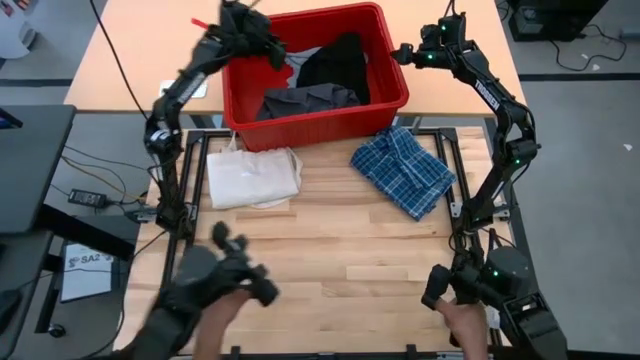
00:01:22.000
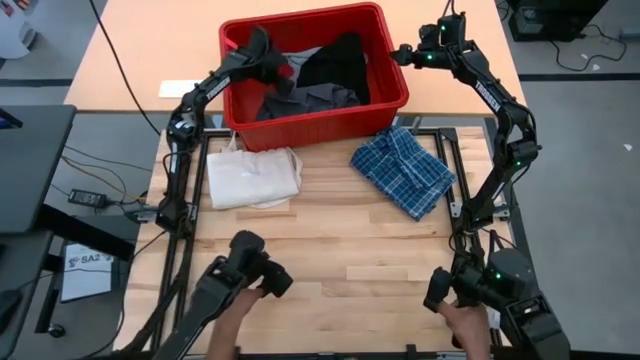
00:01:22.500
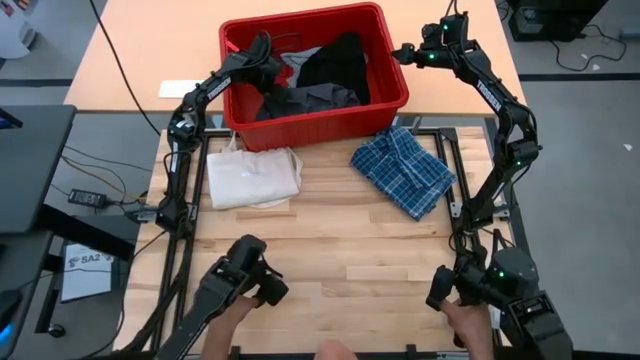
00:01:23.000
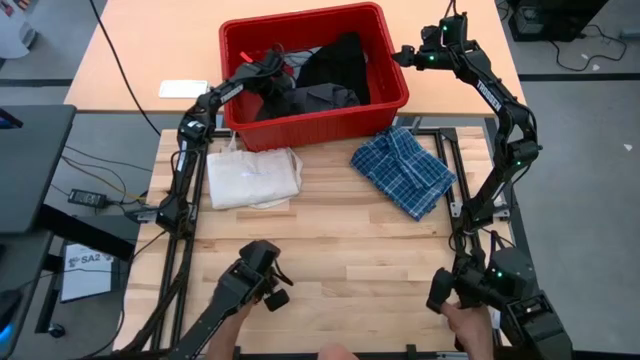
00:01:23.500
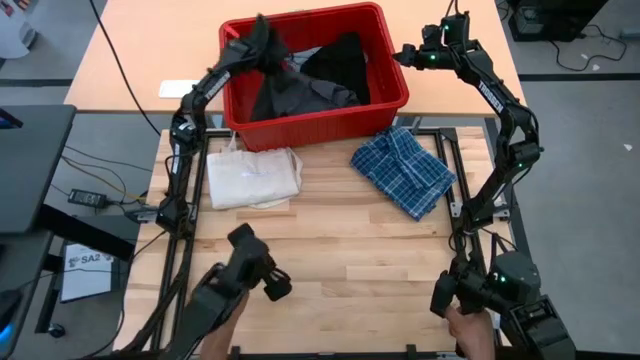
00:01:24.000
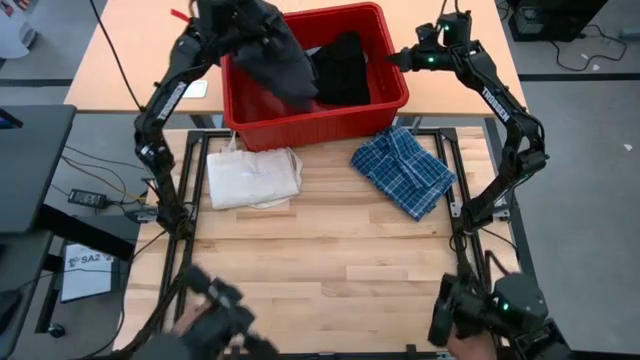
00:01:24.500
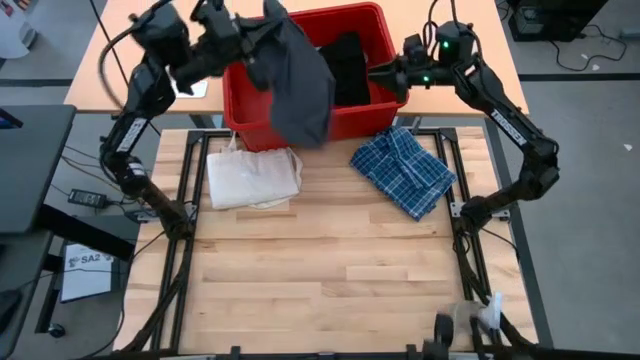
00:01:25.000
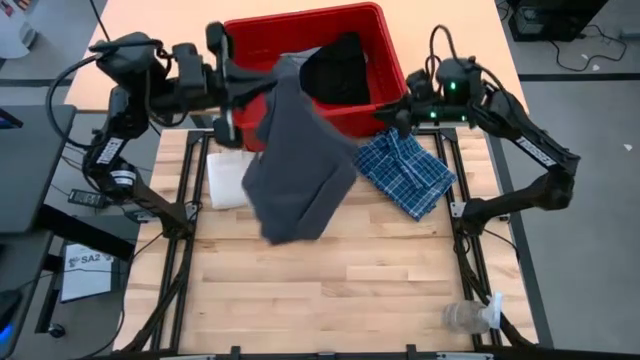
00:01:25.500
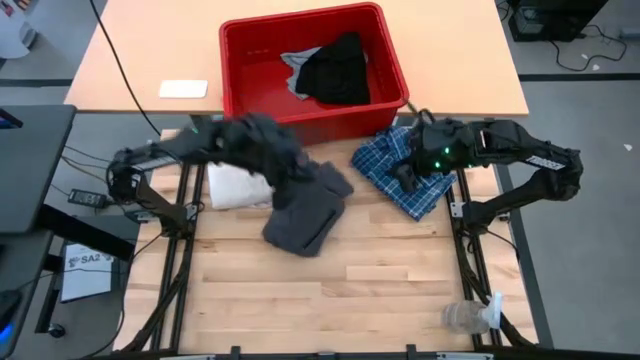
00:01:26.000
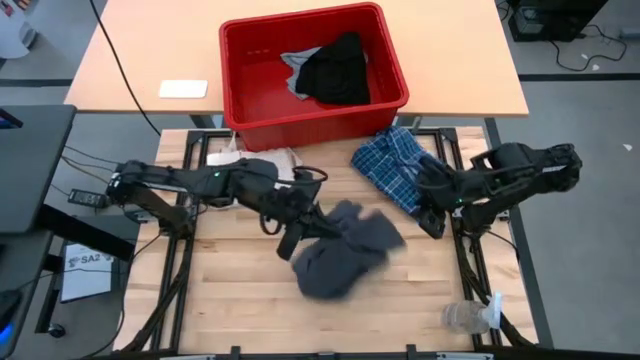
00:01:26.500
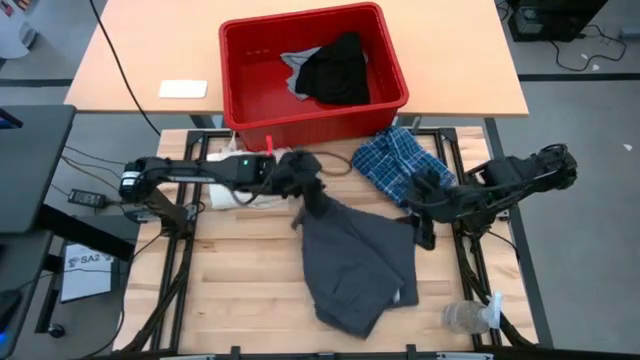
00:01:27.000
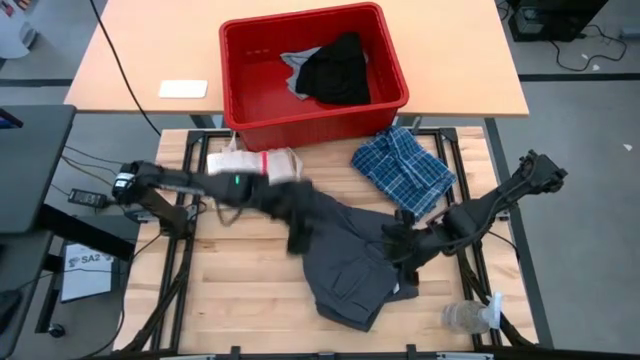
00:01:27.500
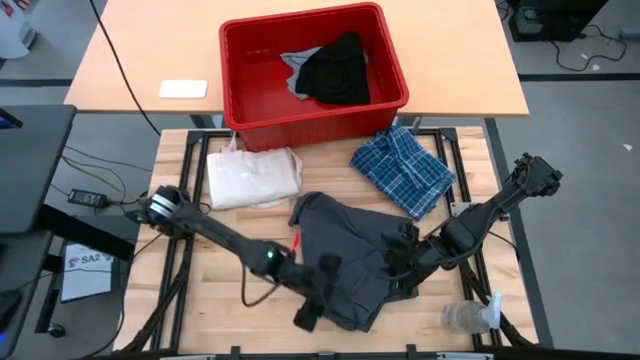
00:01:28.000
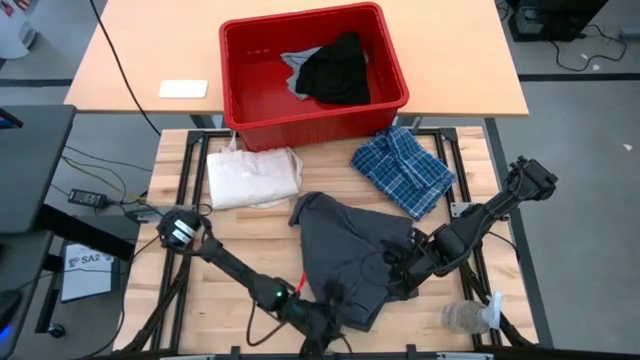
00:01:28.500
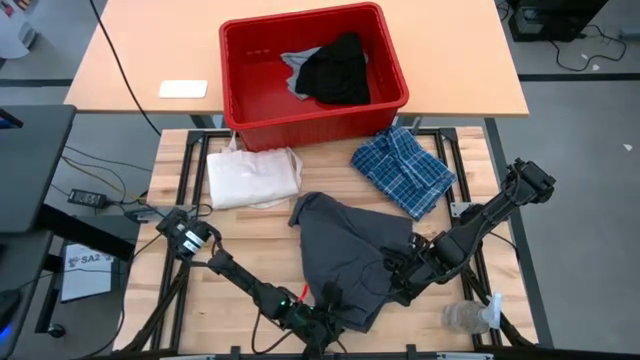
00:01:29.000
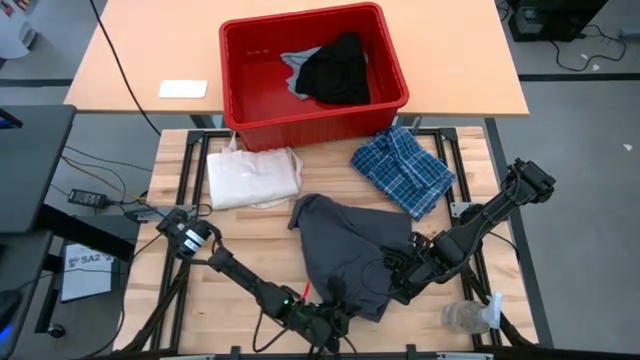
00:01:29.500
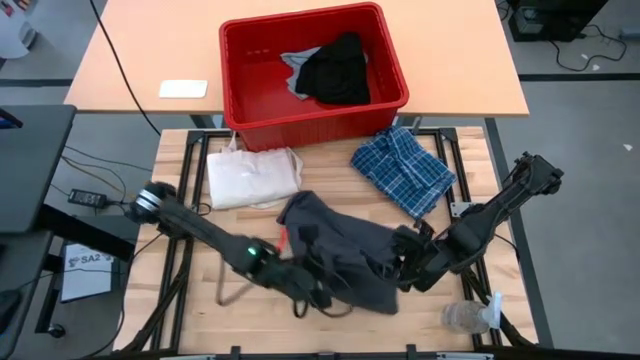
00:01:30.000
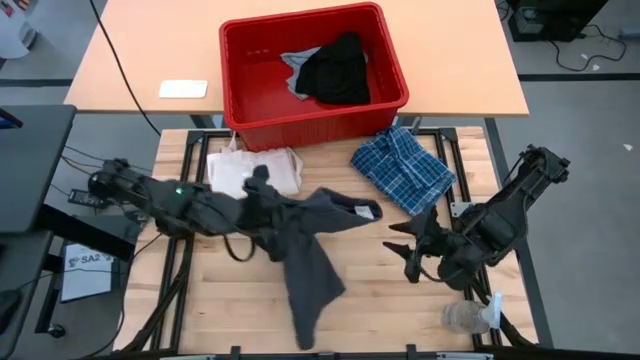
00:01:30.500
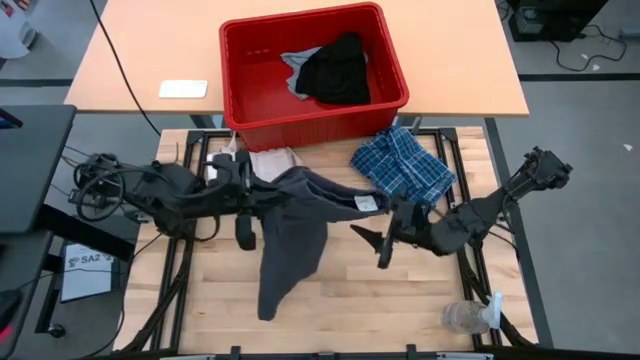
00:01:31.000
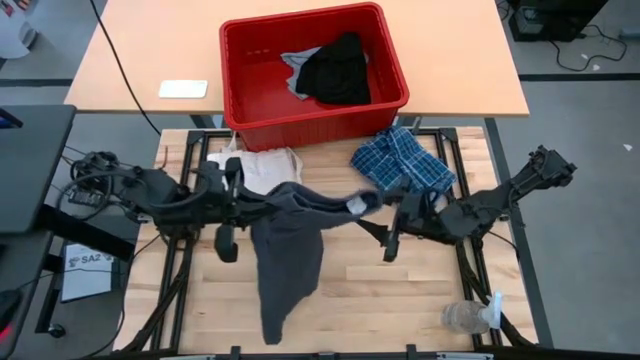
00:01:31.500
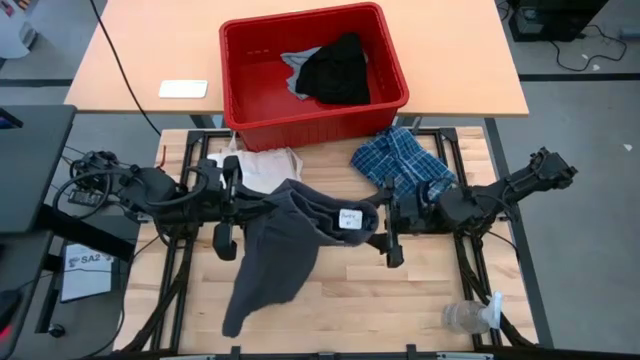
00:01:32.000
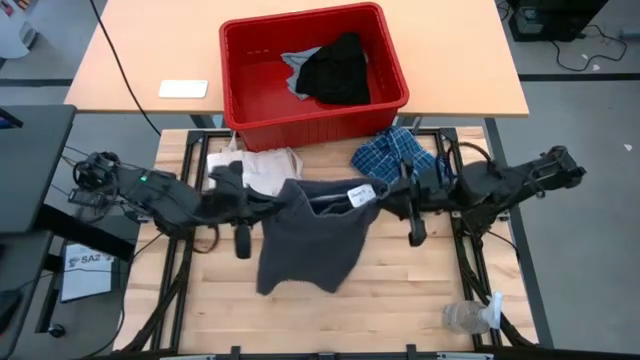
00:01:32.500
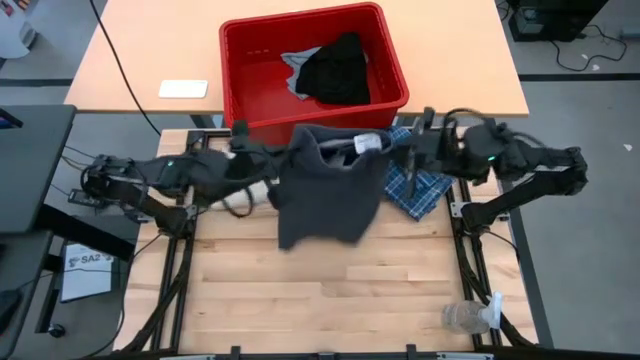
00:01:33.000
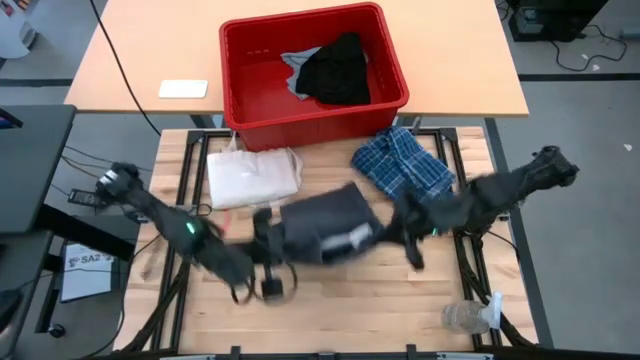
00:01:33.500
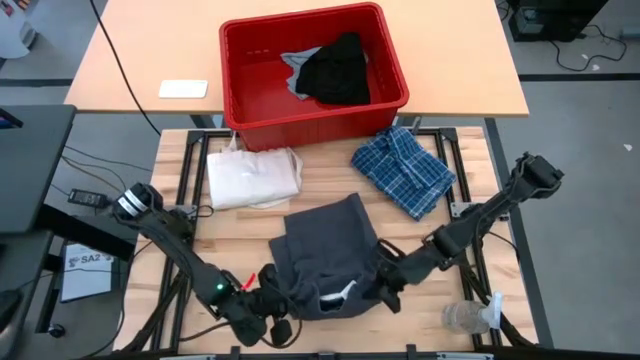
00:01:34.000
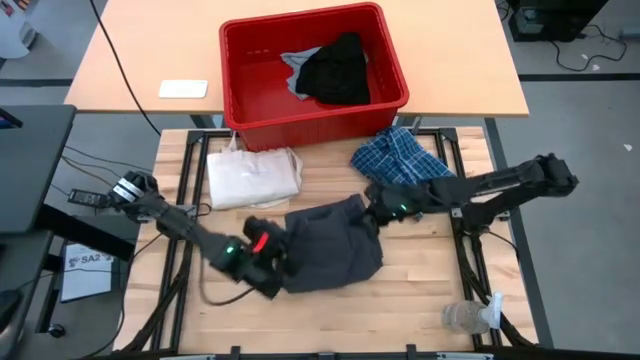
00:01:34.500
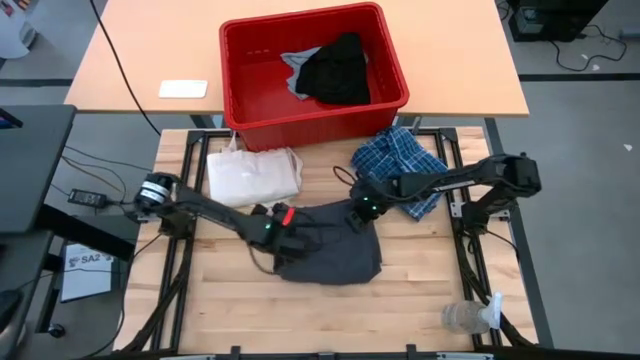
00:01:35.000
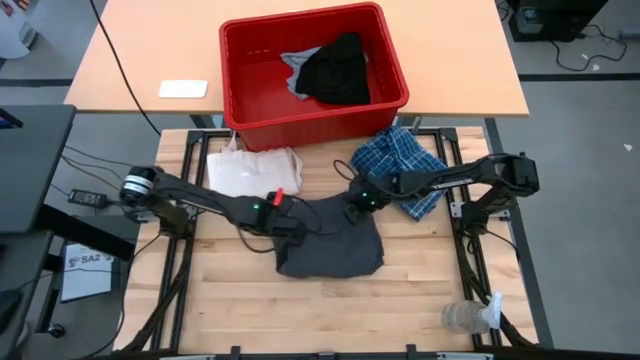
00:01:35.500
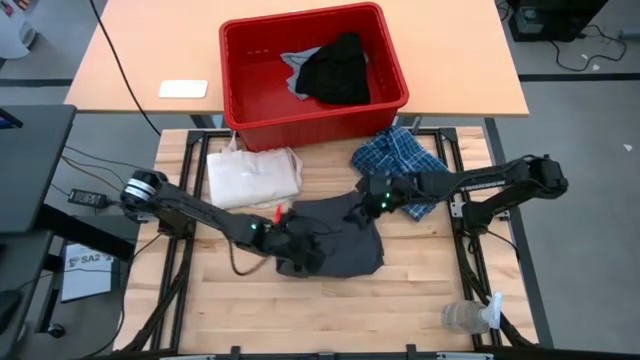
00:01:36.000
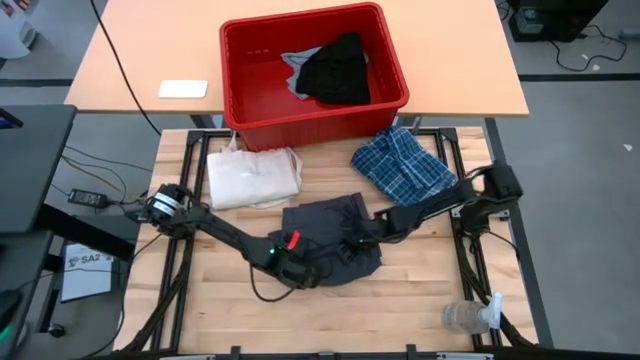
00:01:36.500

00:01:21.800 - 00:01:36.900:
Task: Fold laundry
Fold the gray shorts

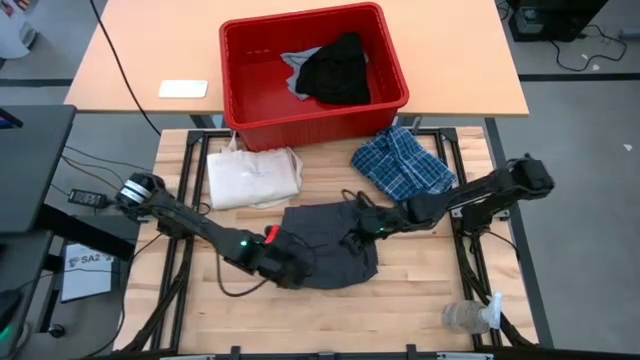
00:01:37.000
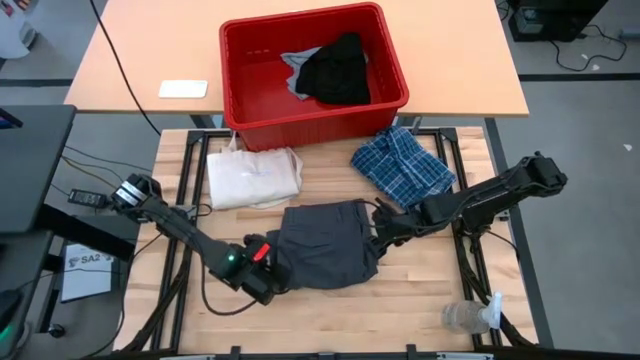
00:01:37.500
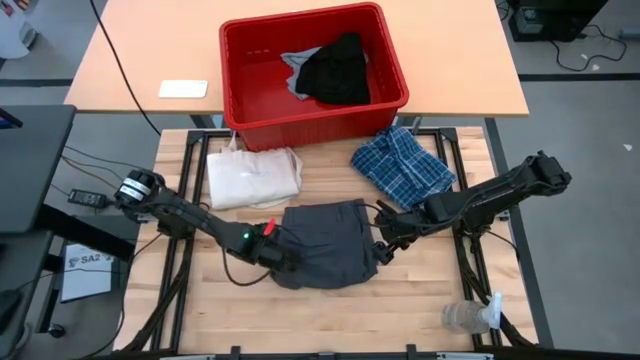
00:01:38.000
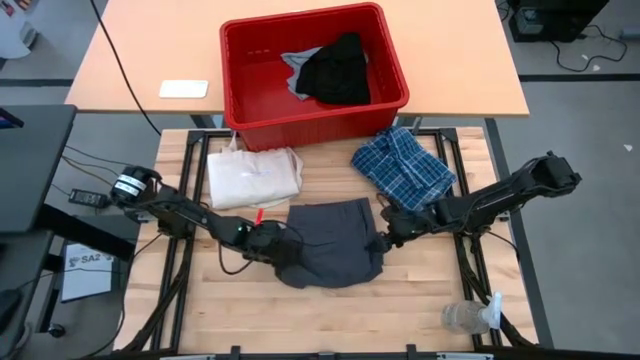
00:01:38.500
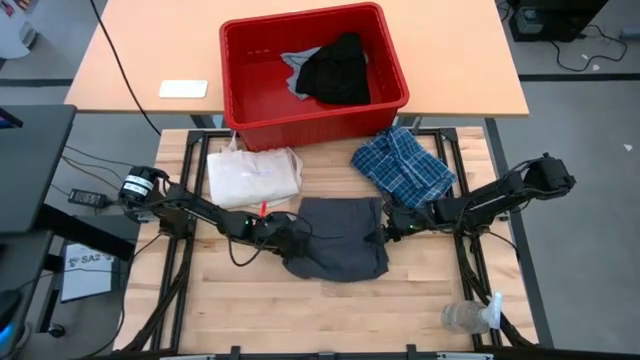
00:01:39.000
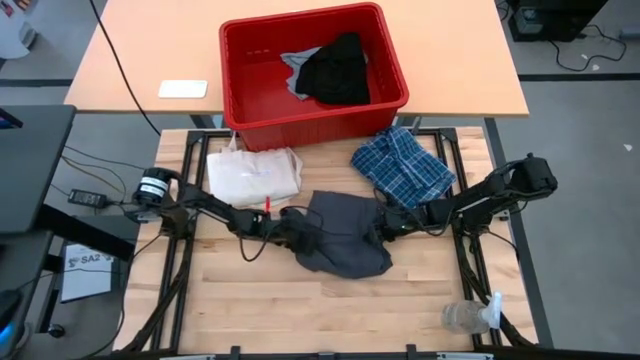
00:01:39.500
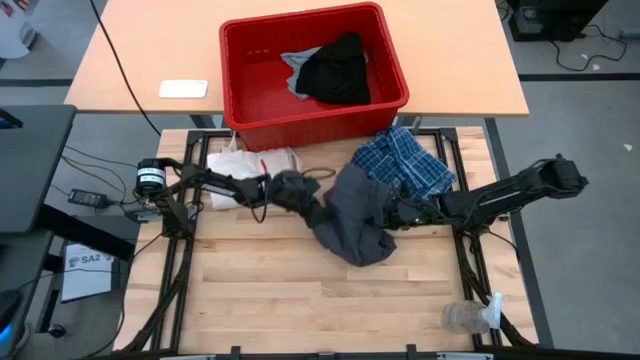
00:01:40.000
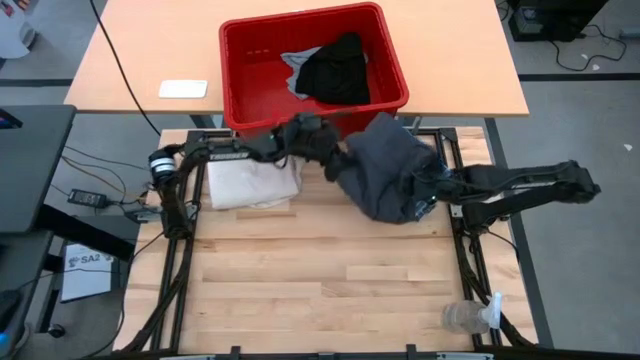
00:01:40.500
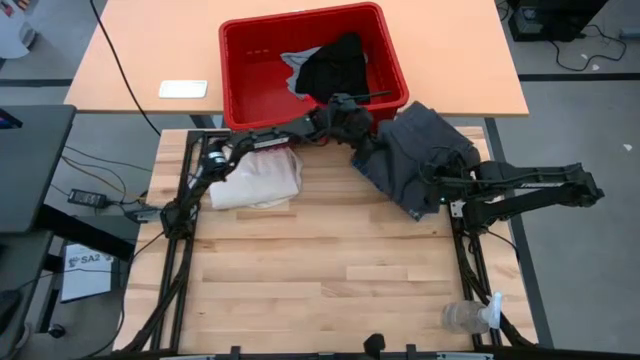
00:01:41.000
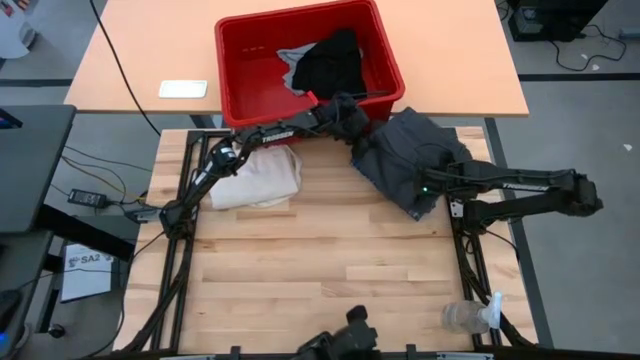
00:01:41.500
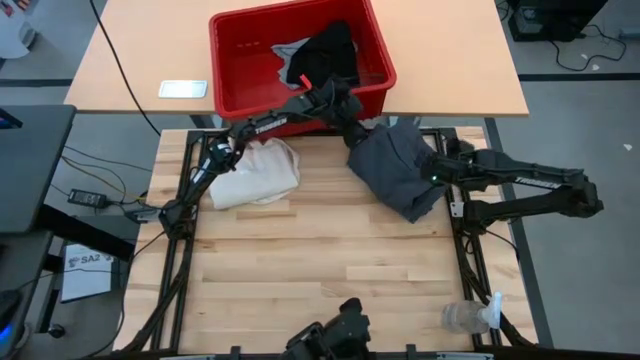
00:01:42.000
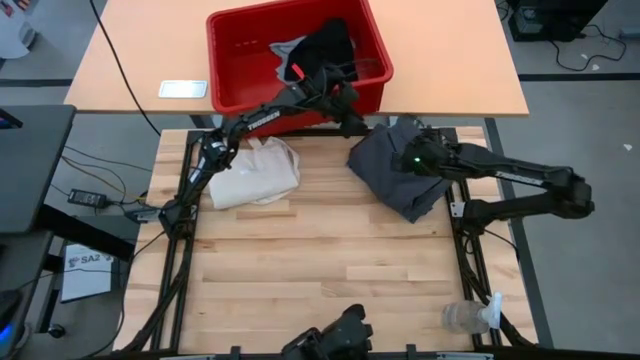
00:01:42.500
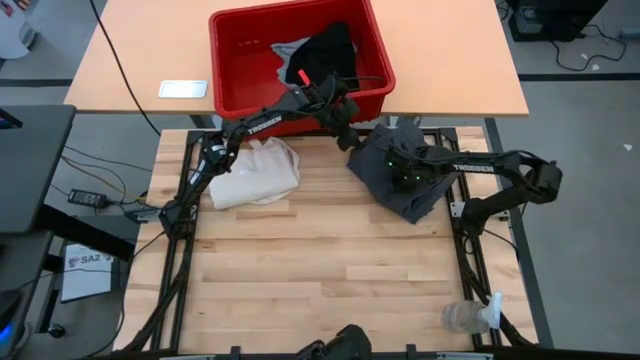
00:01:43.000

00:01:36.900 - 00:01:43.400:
Stack the folded gray shorts on top of the folded blue pants

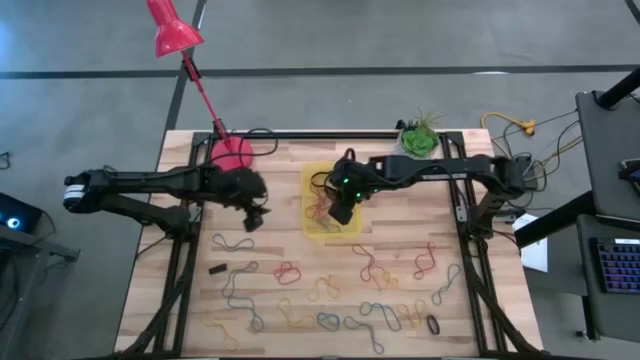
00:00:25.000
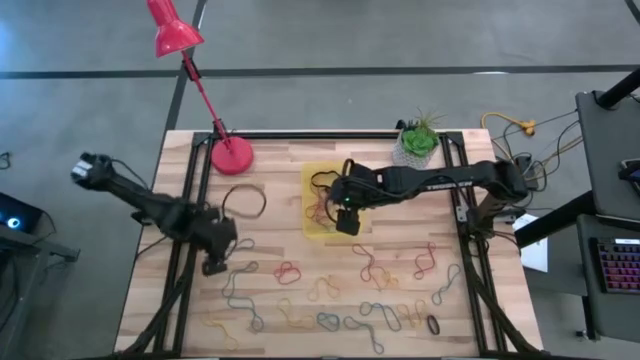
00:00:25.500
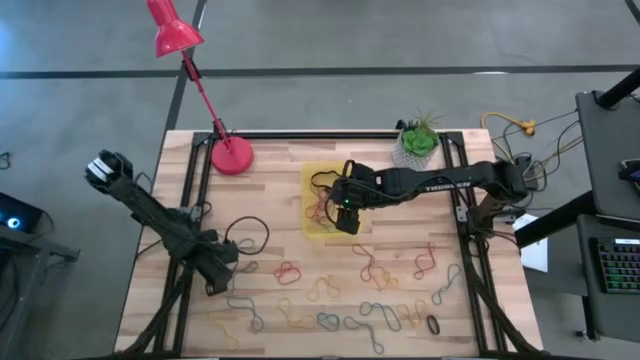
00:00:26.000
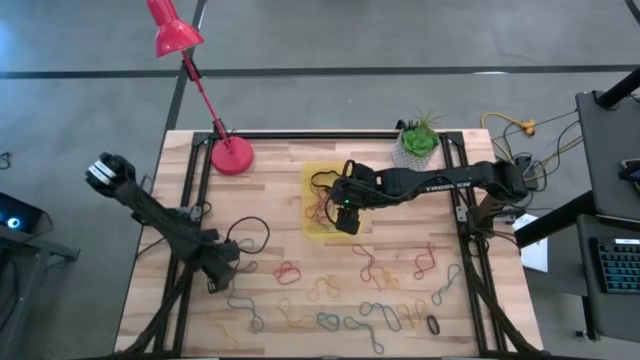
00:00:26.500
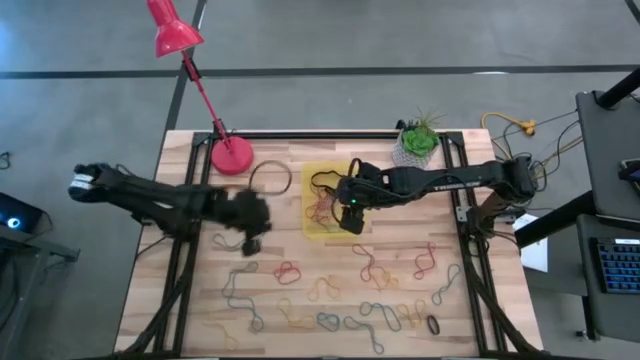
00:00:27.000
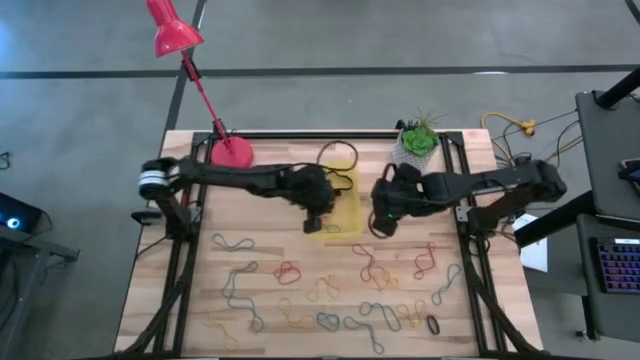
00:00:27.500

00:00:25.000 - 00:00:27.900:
Task: Pick and place rubber bands into bin
Put the black rubber band into the yellow bin
